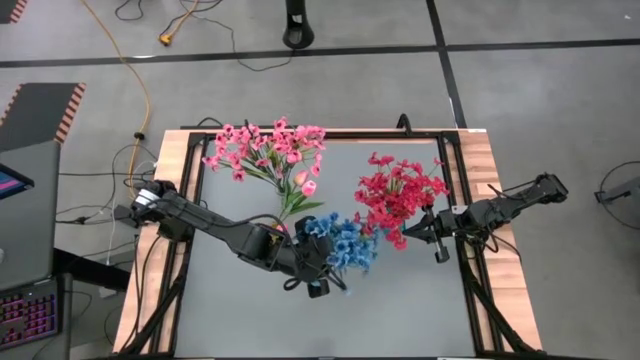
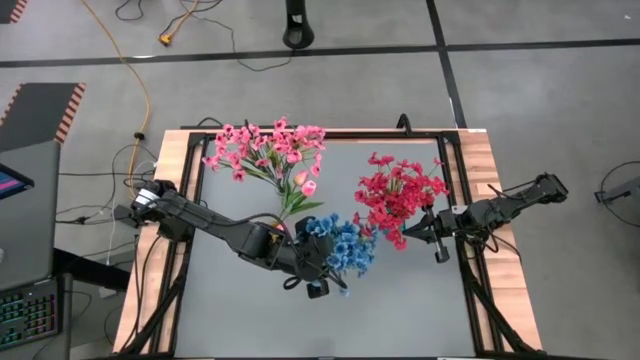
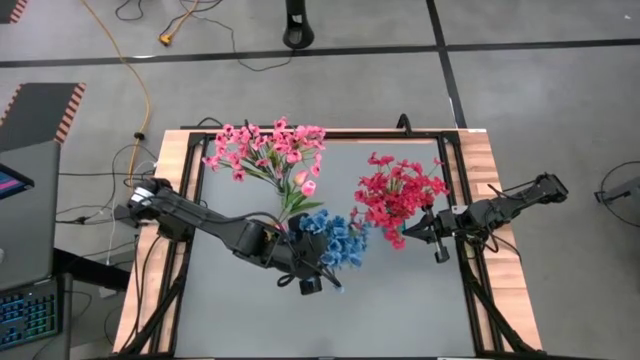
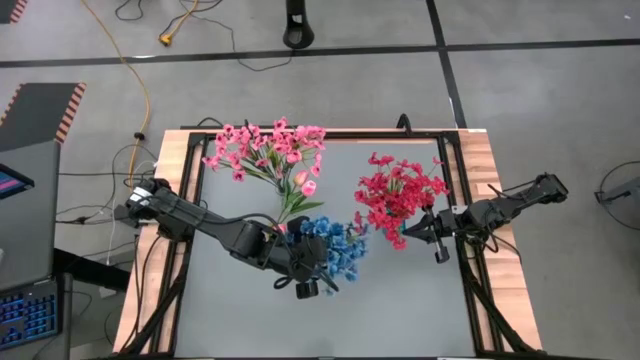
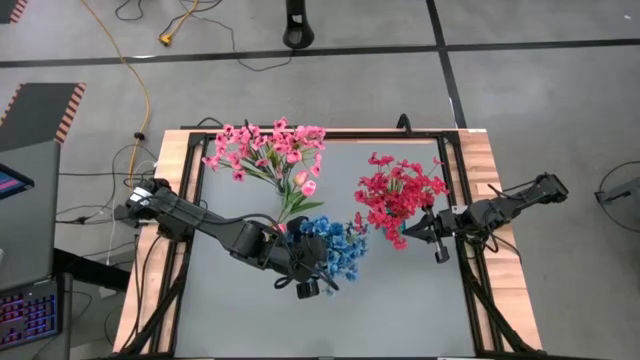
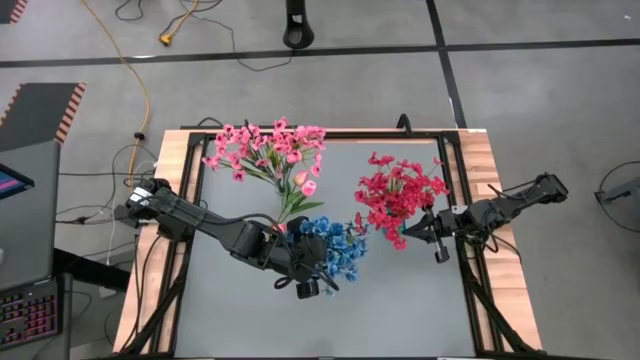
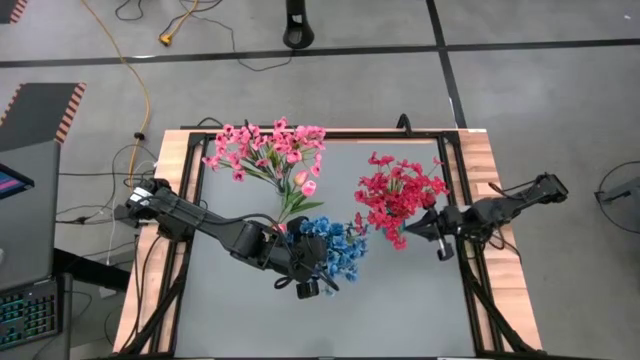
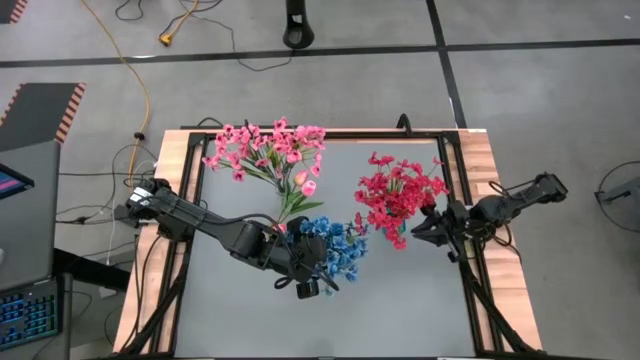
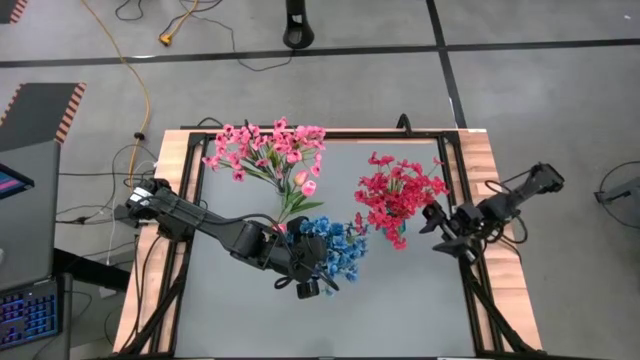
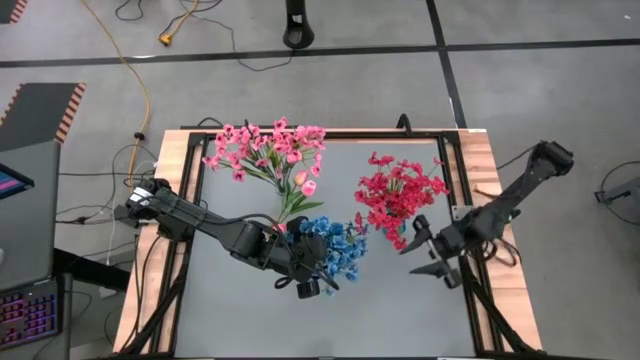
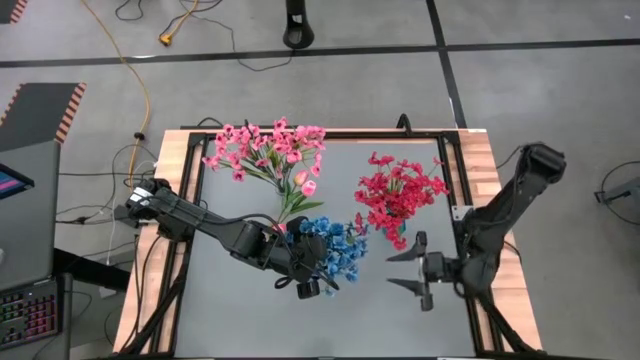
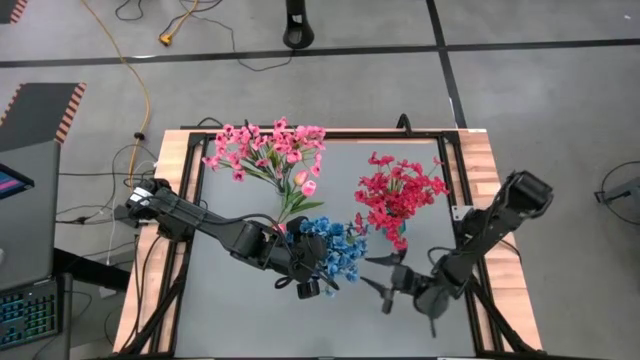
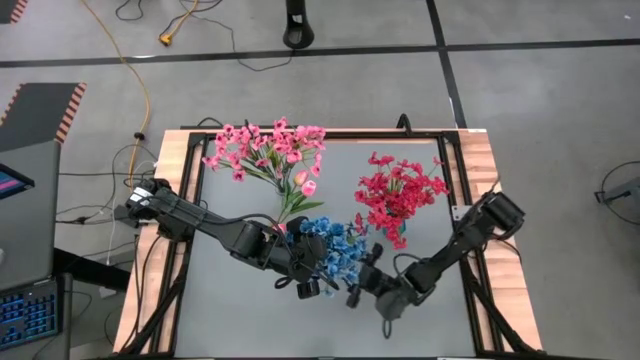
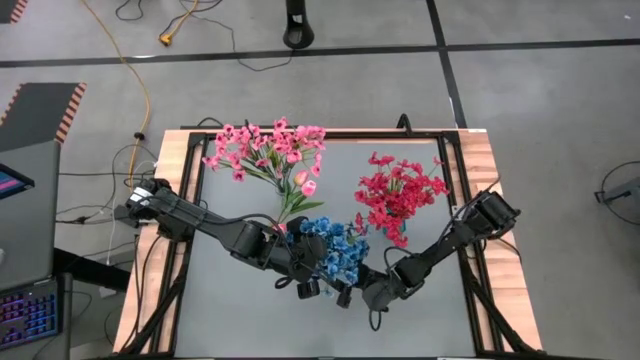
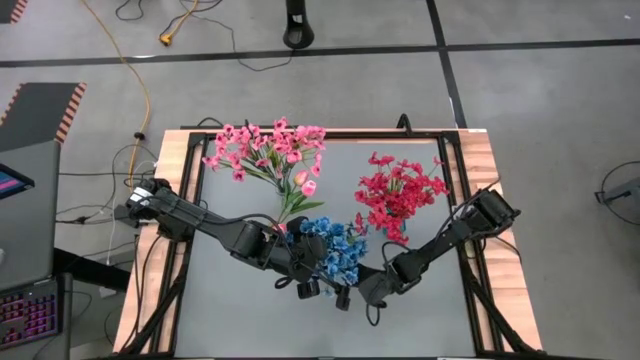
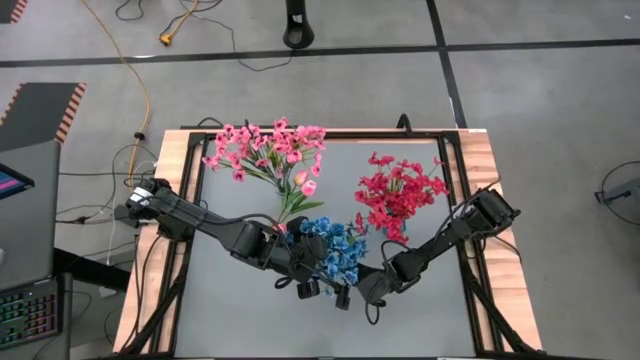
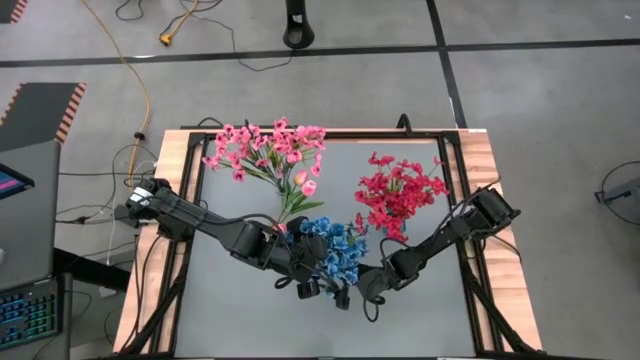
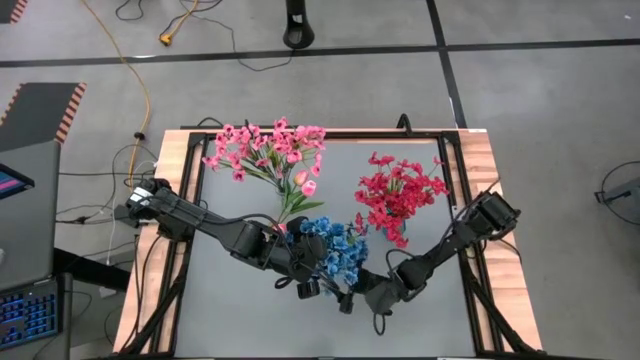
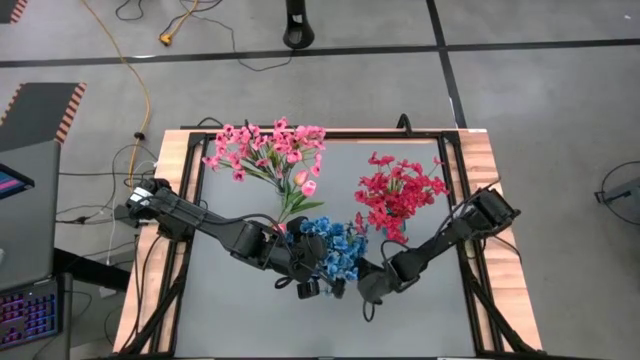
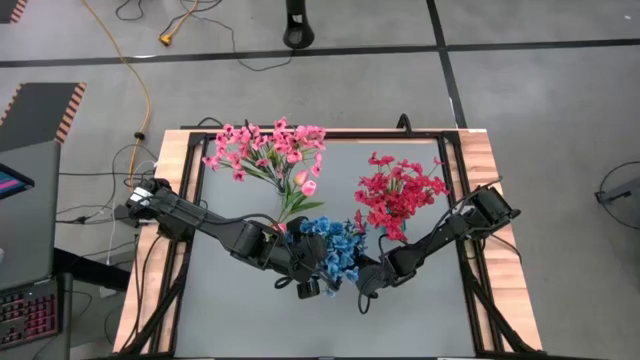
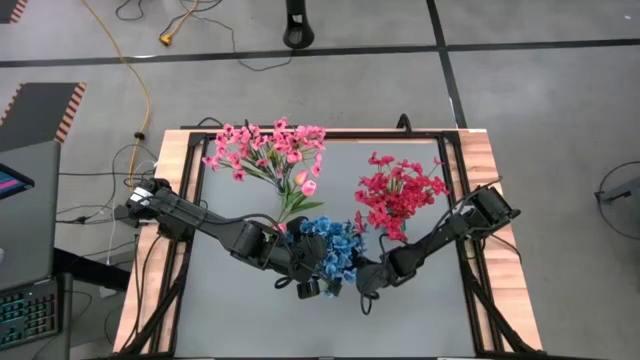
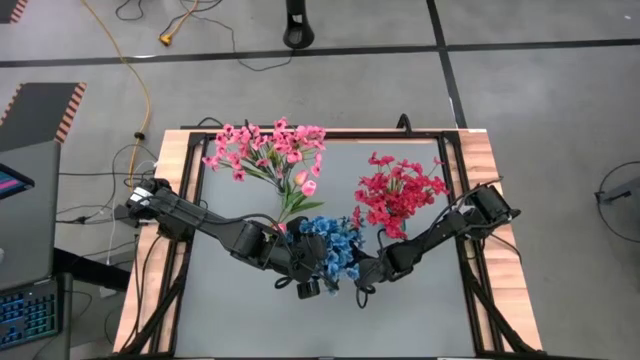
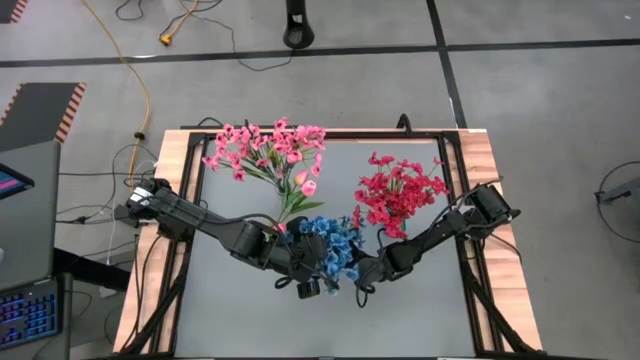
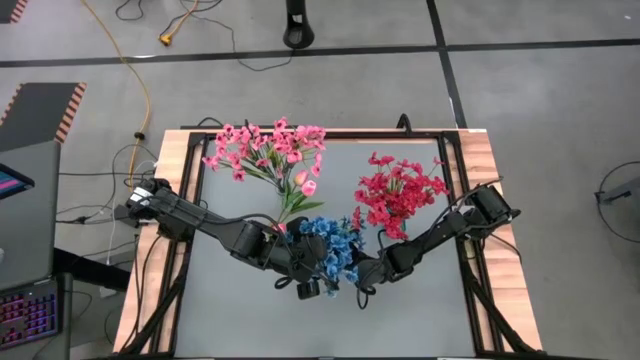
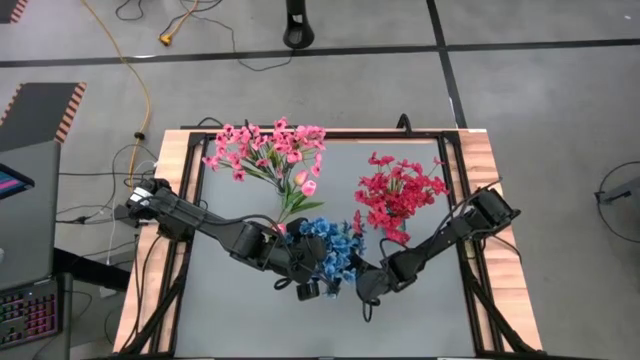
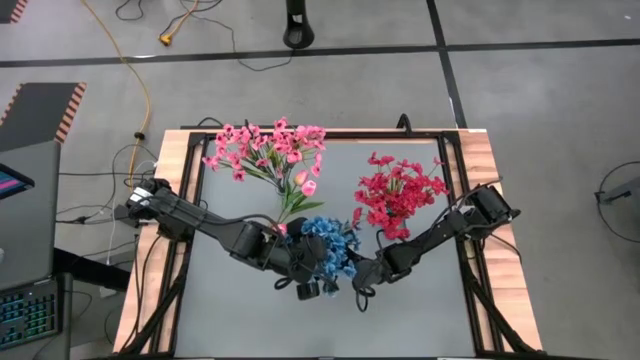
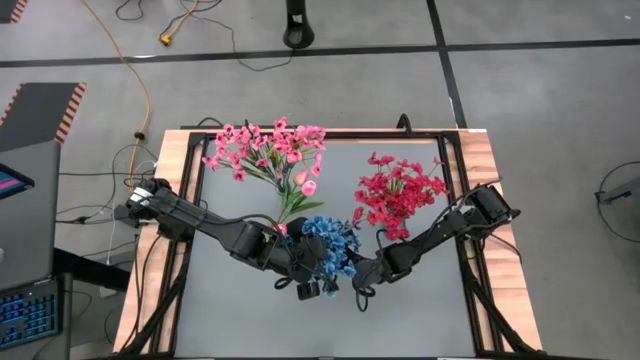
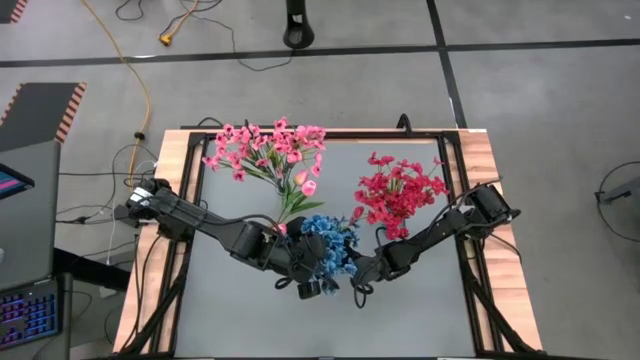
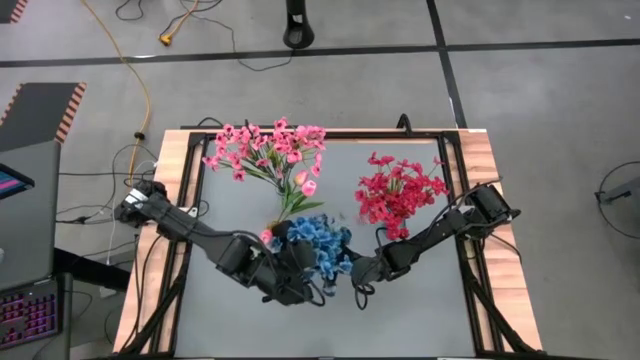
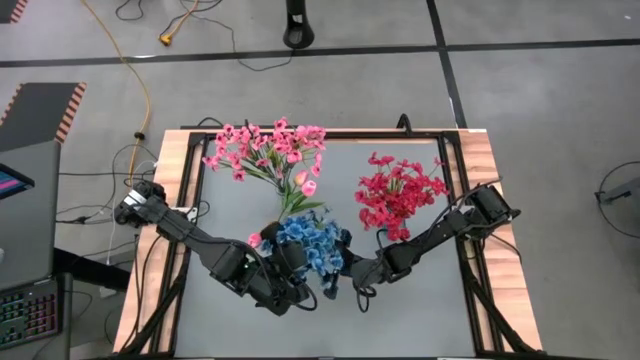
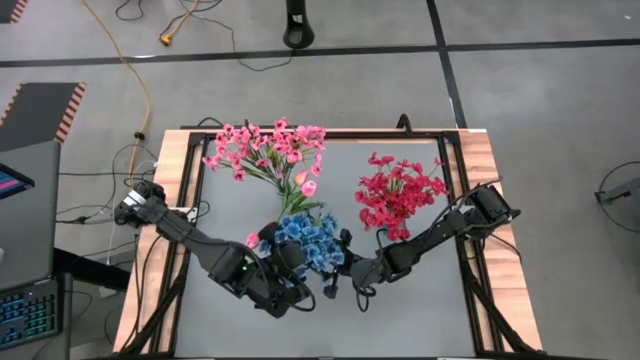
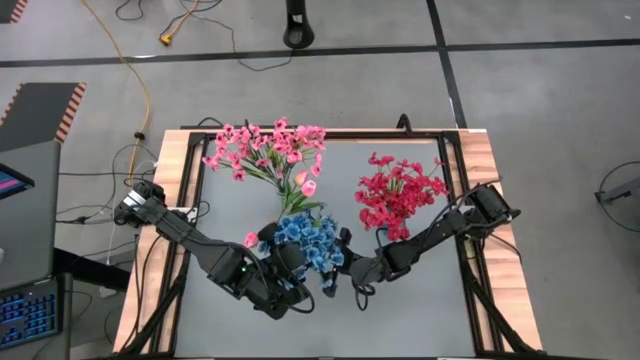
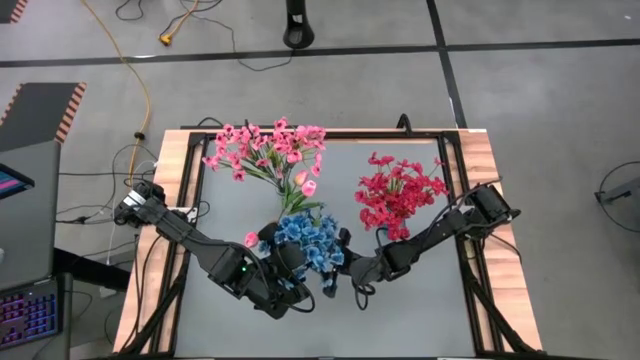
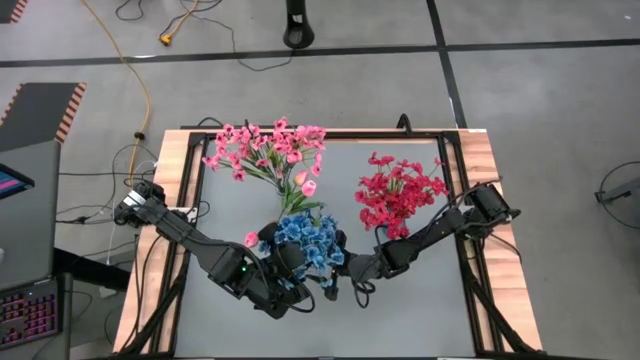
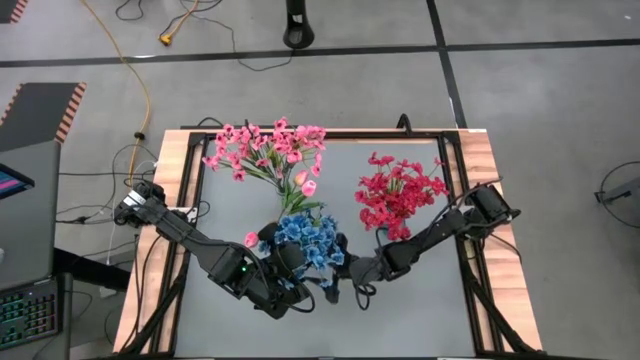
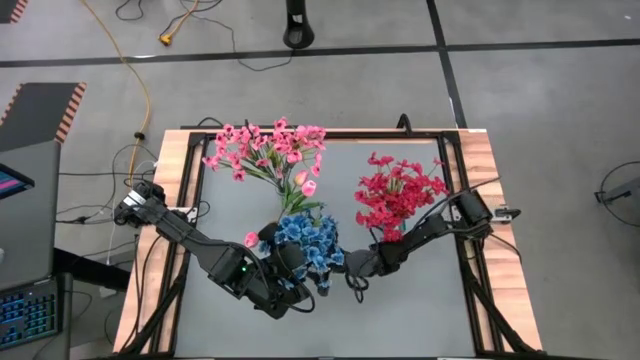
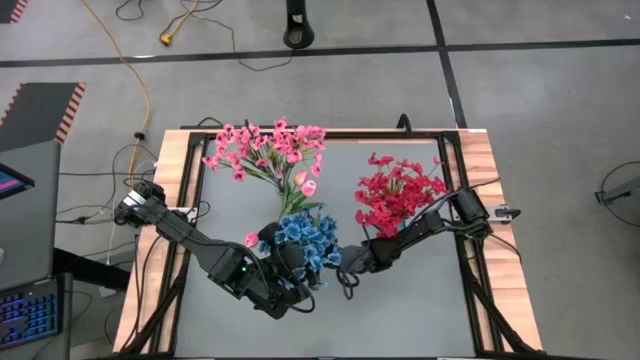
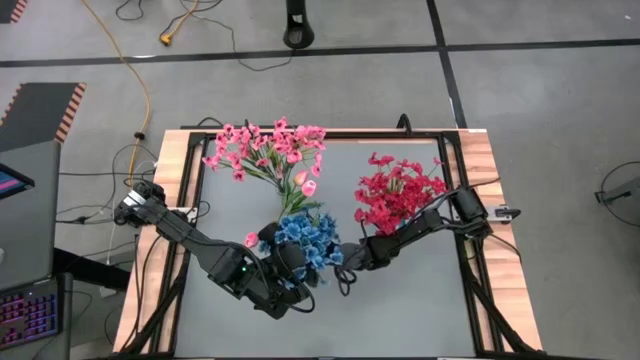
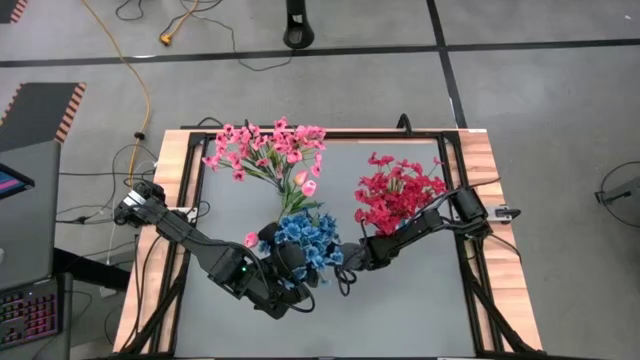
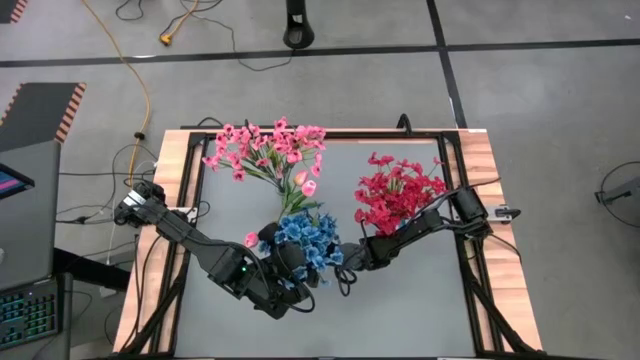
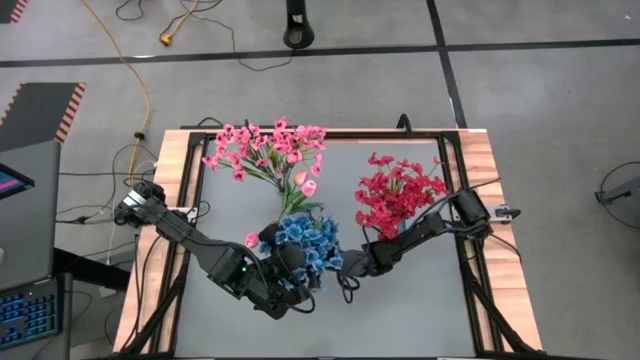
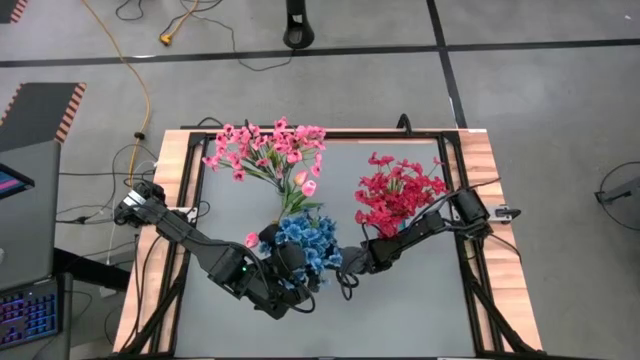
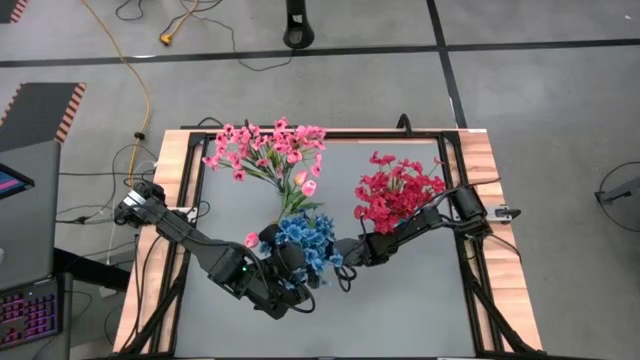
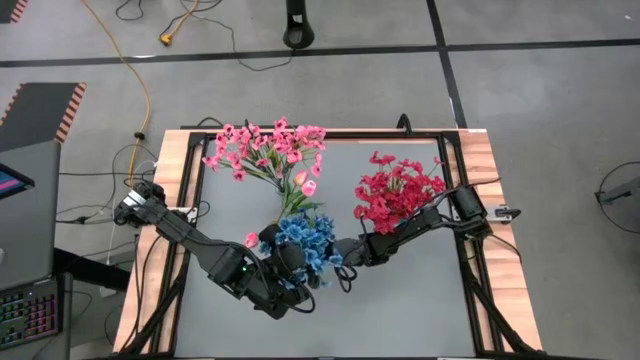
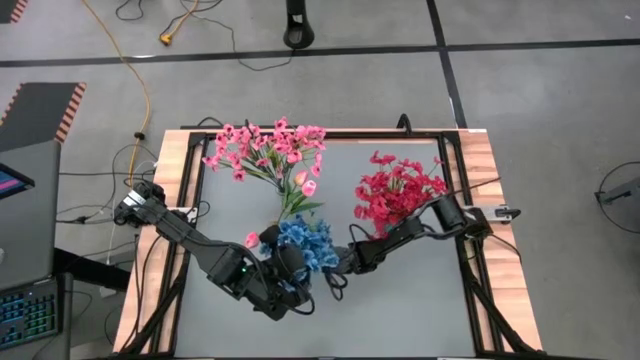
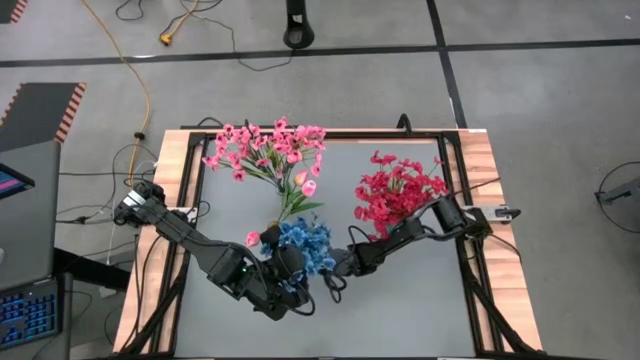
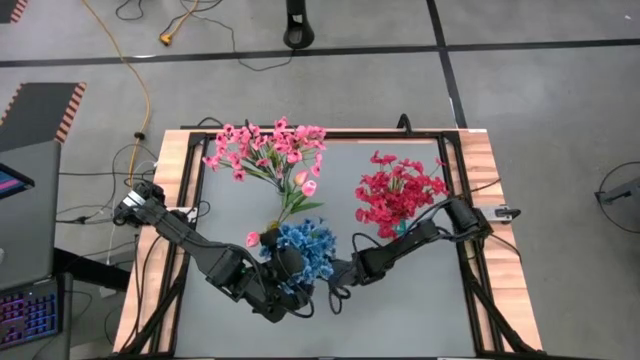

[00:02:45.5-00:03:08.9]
Task: Sort flowers into vase by color
Put the blue flowers into the bottom transparent vase
